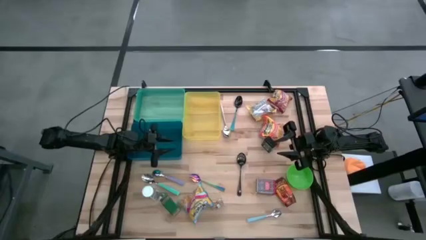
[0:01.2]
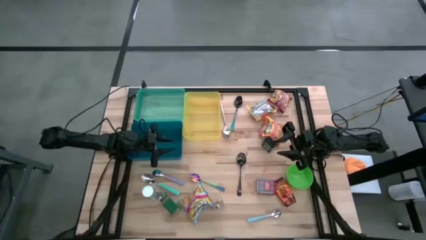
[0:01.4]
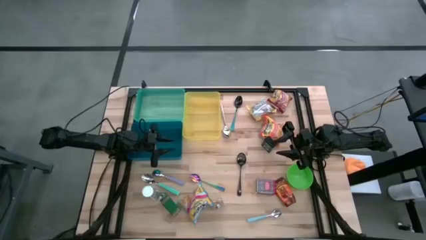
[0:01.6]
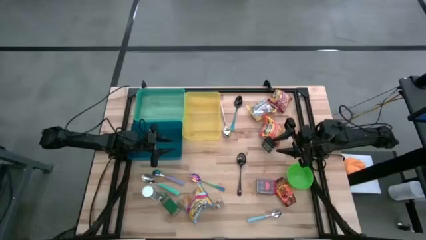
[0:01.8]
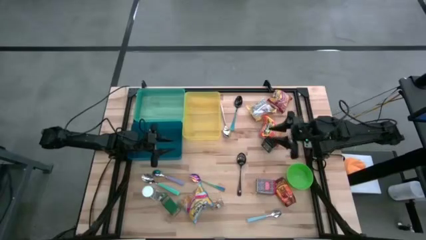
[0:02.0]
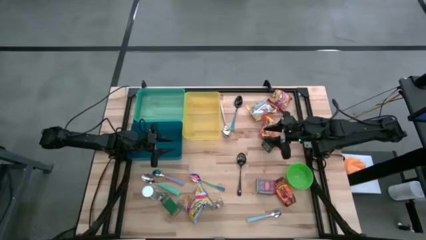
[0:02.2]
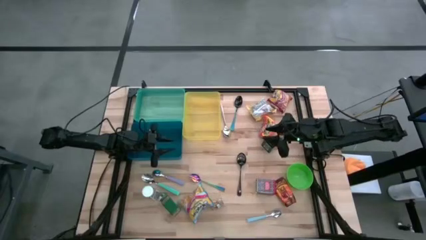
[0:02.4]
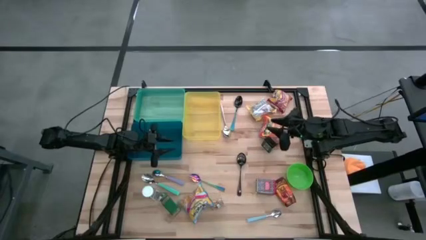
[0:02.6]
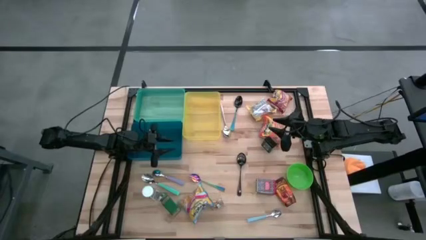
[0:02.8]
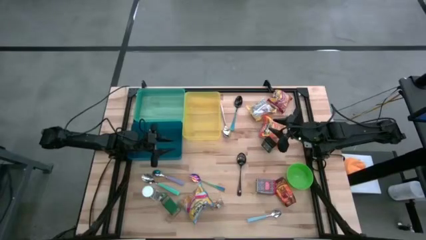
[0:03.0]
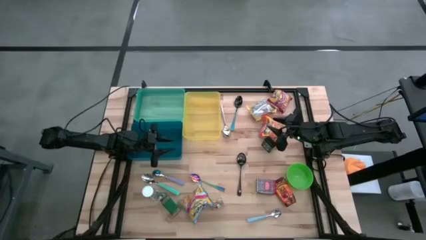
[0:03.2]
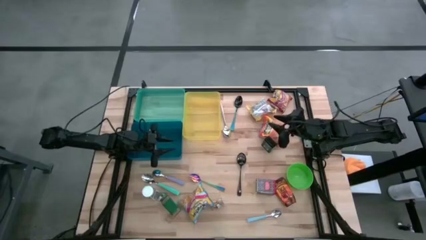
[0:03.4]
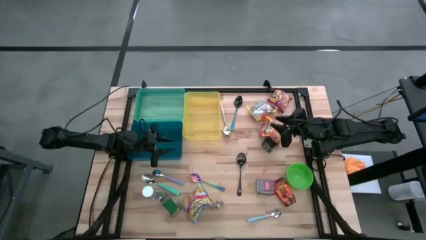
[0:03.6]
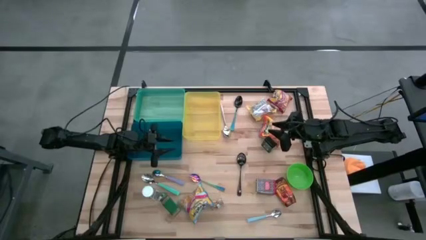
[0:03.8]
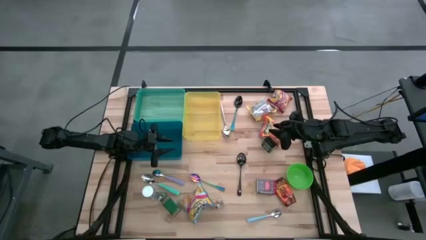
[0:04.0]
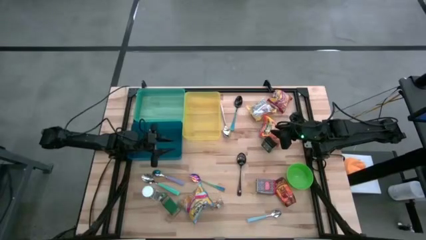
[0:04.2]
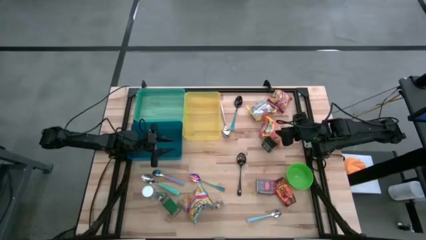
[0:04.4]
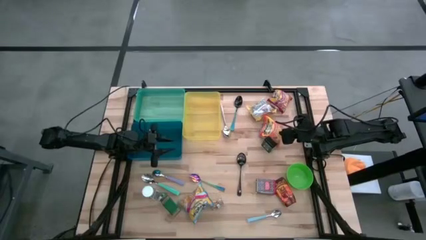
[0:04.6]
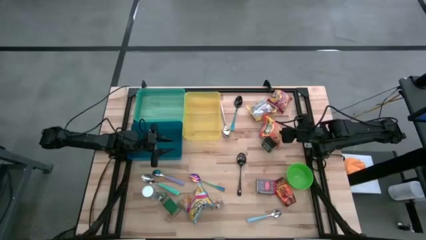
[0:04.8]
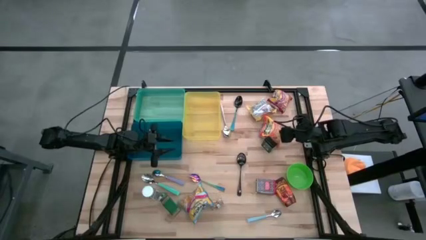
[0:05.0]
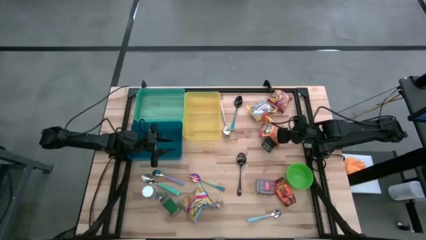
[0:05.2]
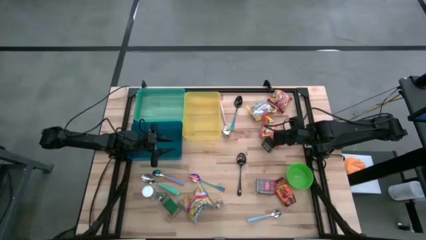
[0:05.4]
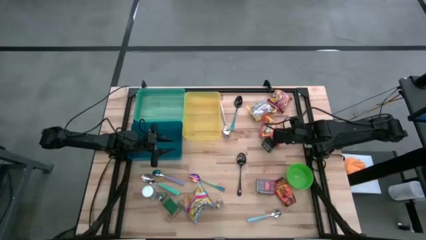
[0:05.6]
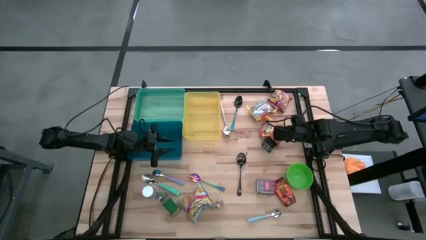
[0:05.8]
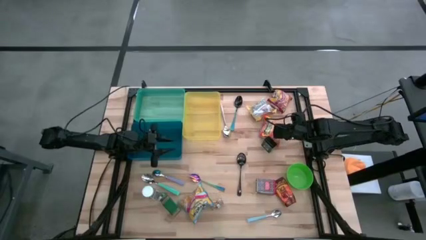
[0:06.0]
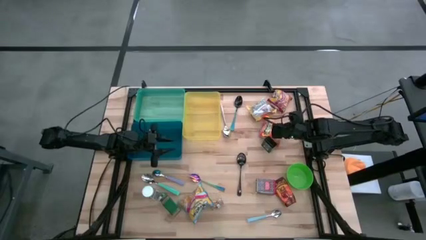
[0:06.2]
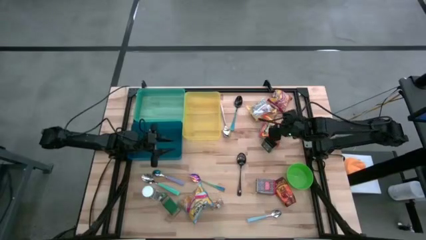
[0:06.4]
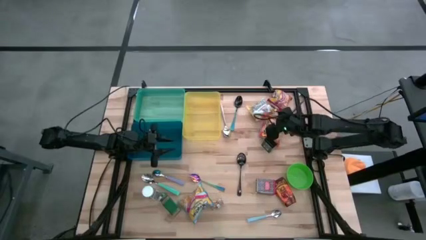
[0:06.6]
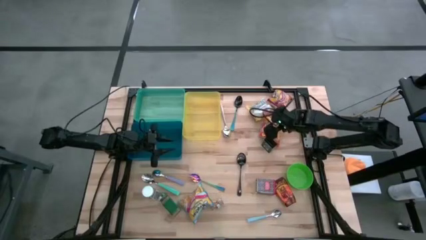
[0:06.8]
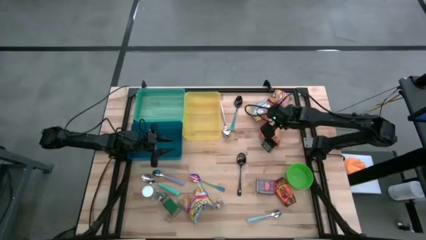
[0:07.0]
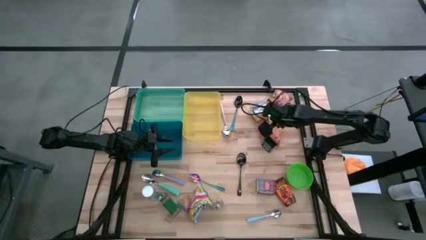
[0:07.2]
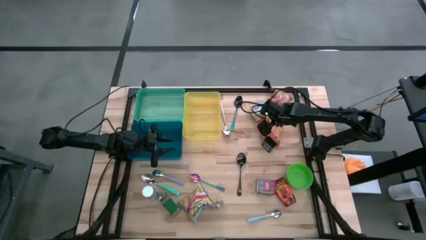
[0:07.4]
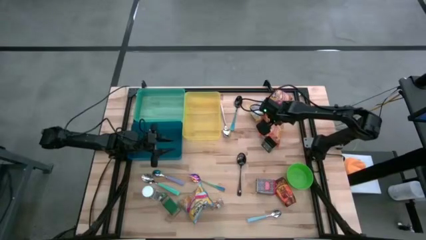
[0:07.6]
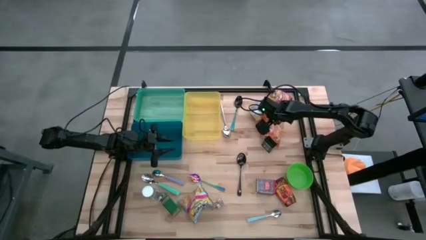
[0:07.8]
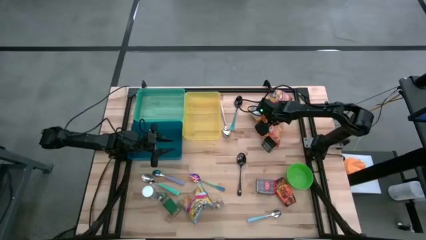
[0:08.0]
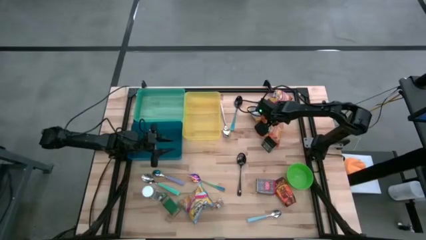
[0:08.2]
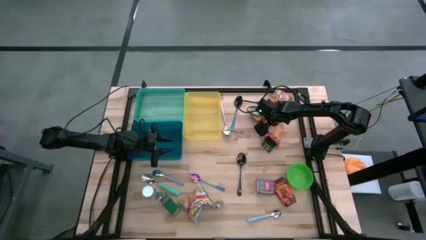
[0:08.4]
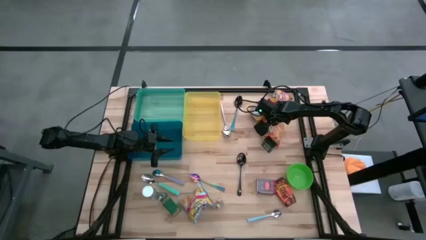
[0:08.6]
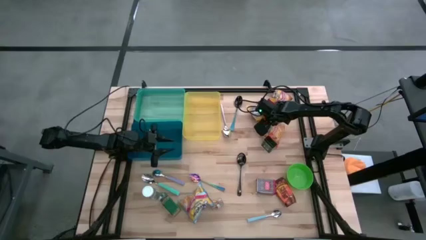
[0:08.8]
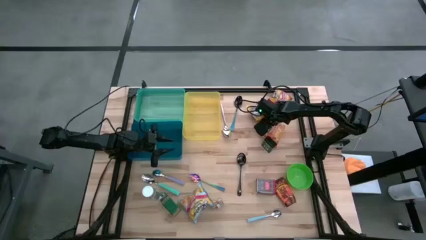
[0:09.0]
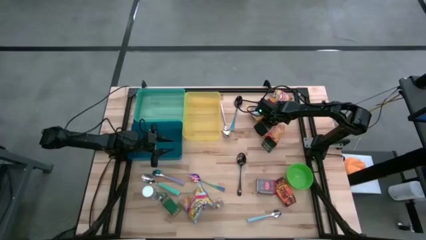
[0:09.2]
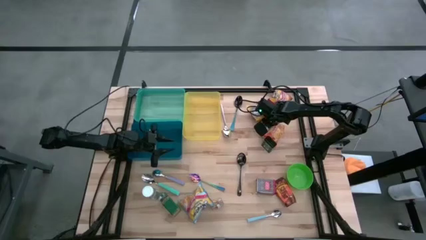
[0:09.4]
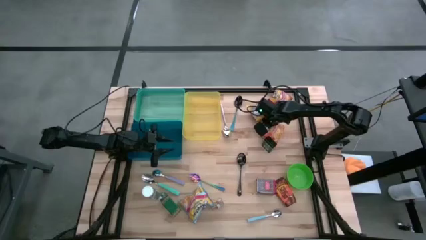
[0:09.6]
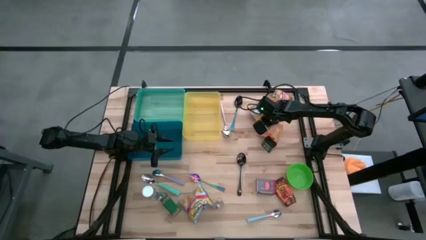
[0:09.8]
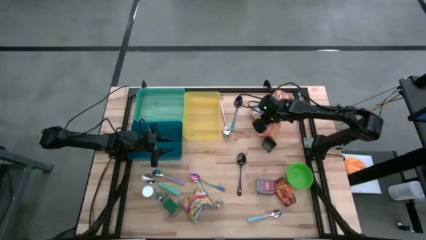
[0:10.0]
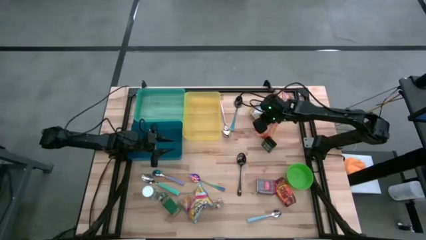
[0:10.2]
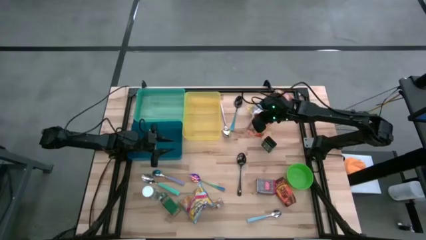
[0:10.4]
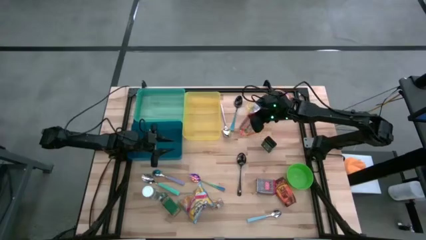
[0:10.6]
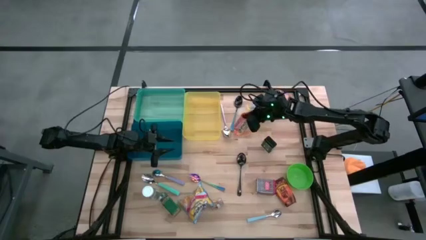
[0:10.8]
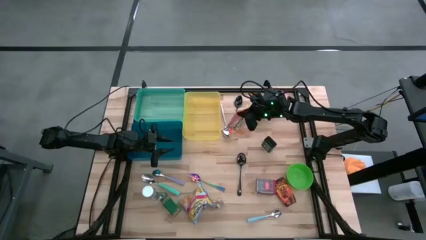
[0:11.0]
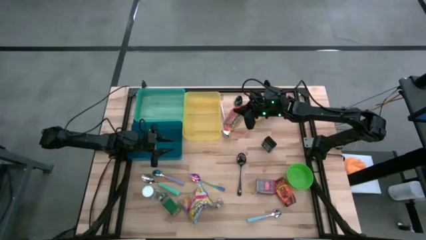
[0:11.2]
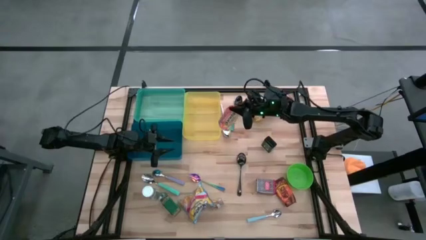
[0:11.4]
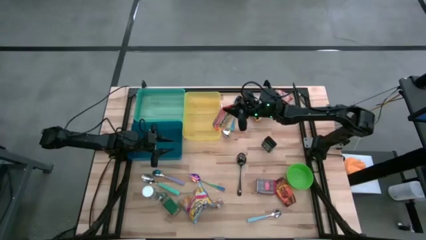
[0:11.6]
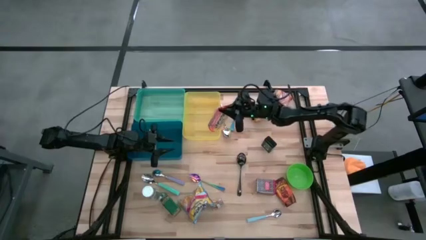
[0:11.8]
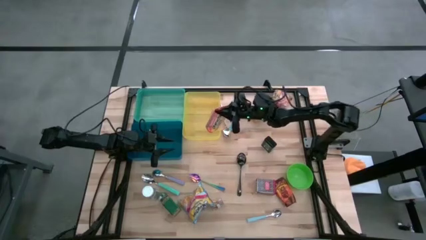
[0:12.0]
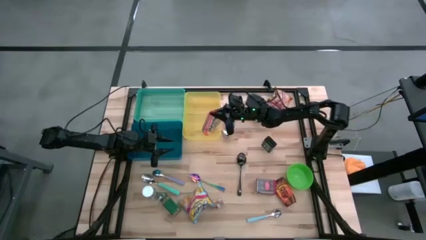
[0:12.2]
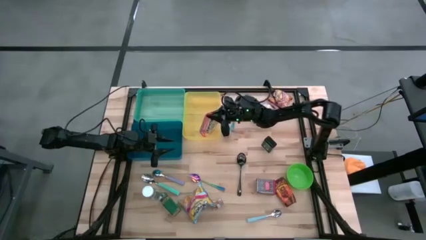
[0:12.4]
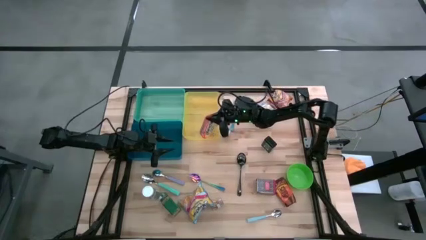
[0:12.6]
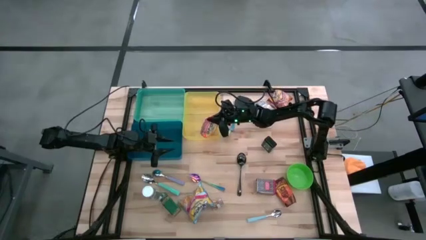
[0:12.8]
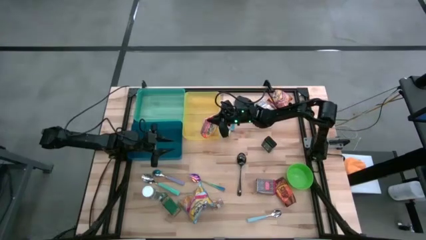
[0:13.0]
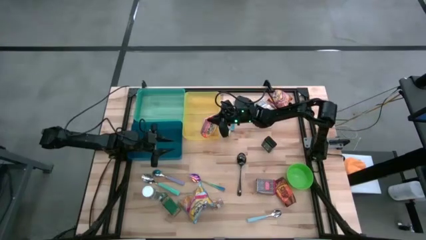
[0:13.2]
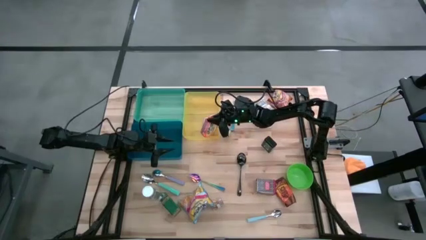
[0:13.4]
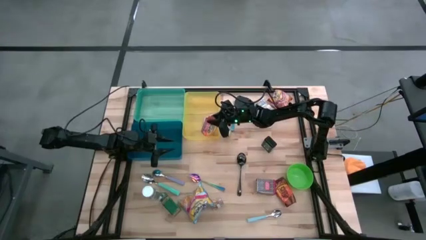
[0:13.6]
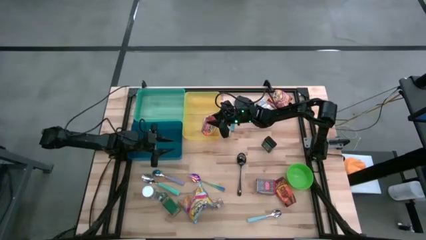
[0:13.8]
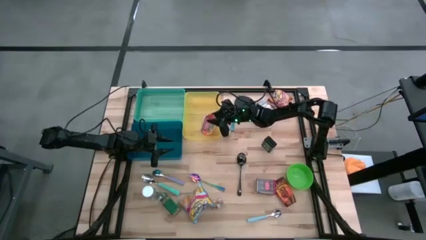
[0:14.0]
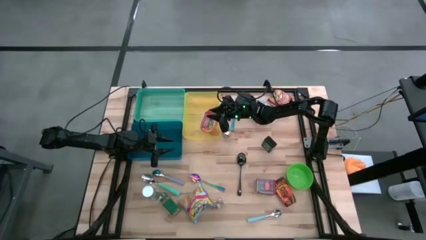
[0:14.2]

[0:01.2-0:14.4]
Put the orange noodle pack into the yellow bin
